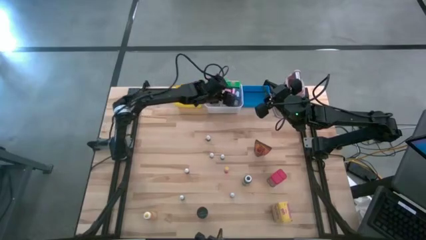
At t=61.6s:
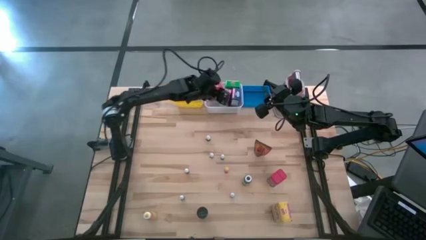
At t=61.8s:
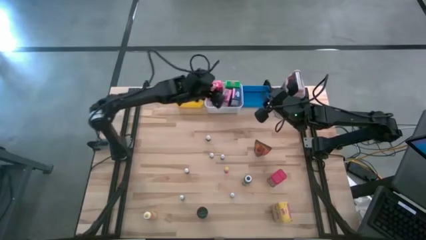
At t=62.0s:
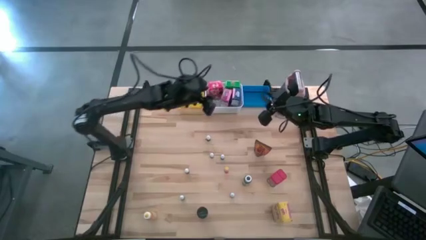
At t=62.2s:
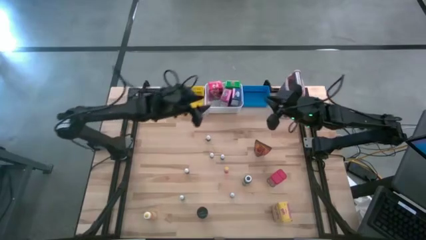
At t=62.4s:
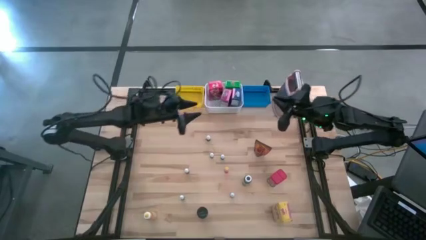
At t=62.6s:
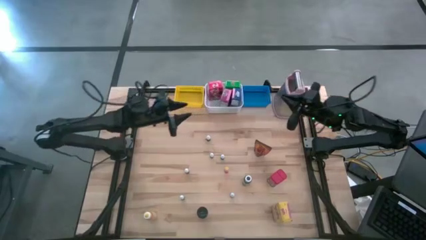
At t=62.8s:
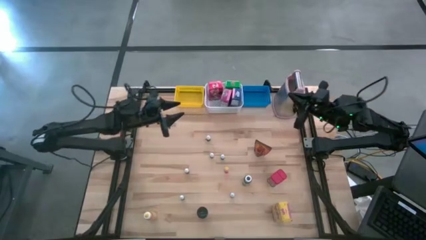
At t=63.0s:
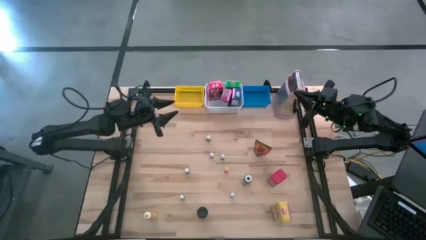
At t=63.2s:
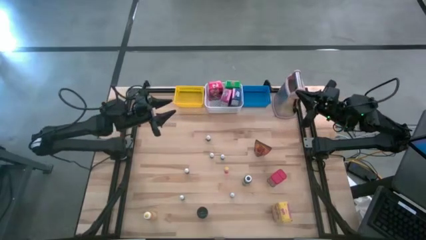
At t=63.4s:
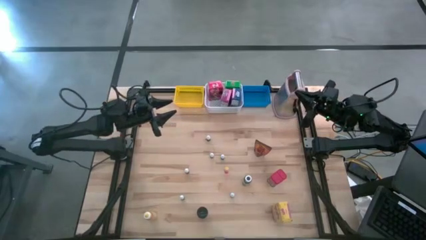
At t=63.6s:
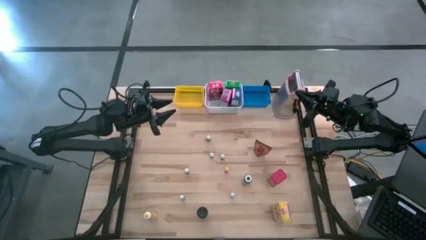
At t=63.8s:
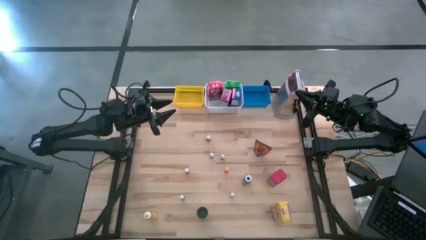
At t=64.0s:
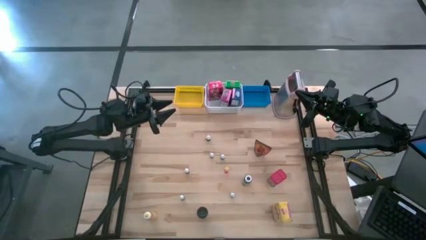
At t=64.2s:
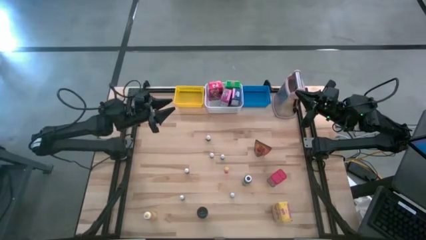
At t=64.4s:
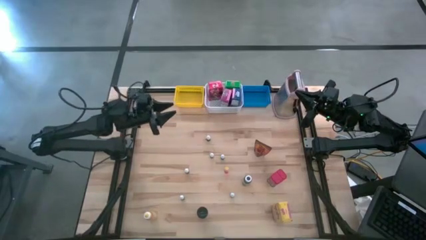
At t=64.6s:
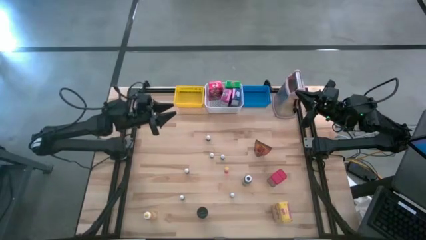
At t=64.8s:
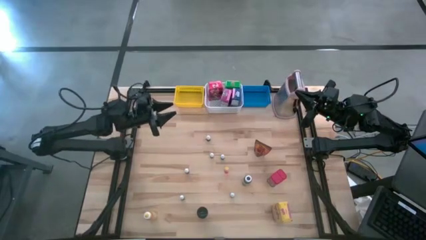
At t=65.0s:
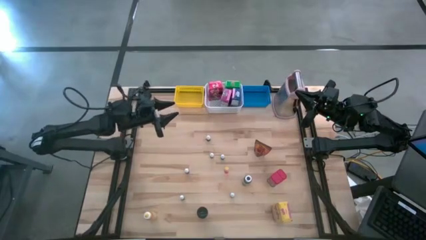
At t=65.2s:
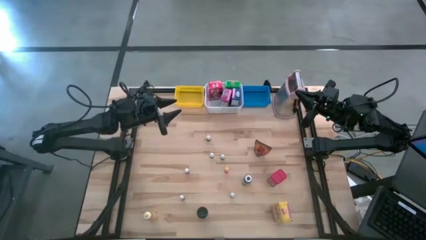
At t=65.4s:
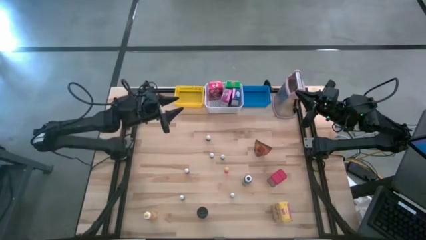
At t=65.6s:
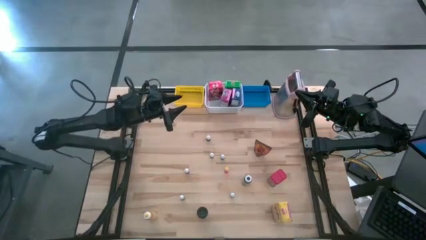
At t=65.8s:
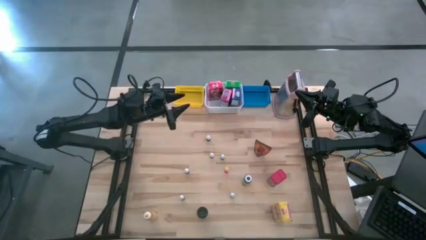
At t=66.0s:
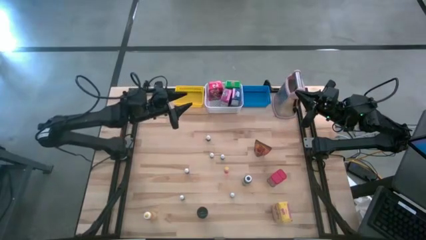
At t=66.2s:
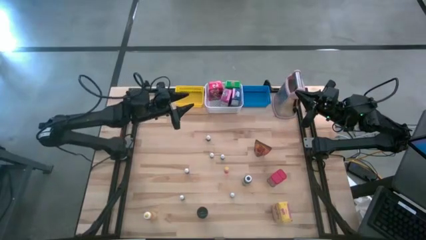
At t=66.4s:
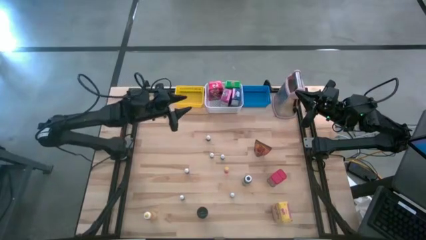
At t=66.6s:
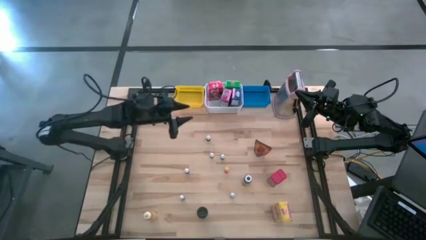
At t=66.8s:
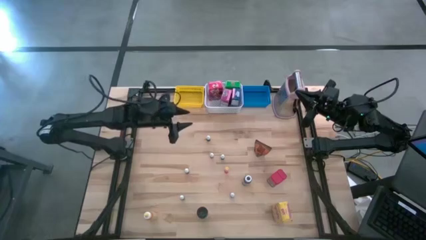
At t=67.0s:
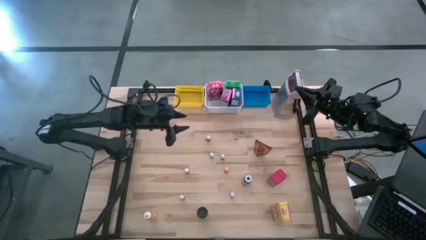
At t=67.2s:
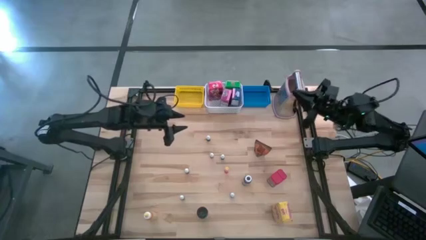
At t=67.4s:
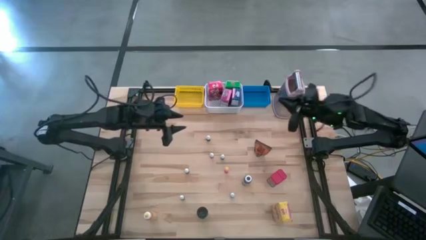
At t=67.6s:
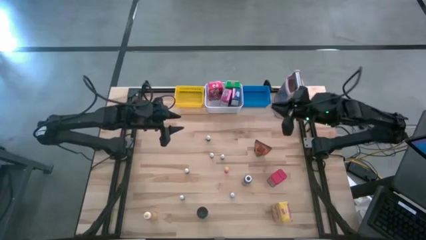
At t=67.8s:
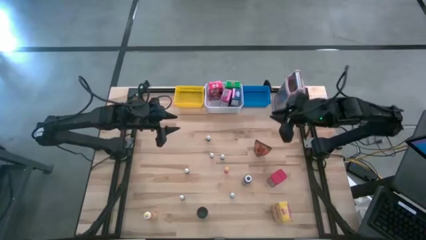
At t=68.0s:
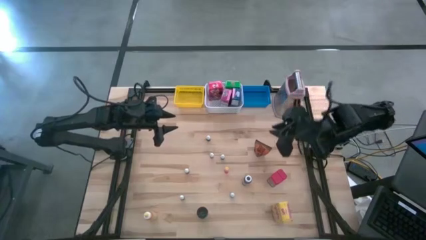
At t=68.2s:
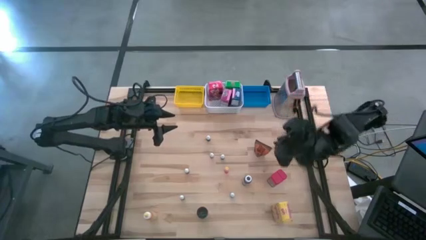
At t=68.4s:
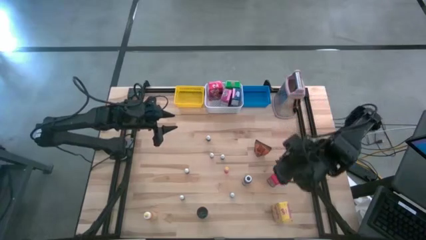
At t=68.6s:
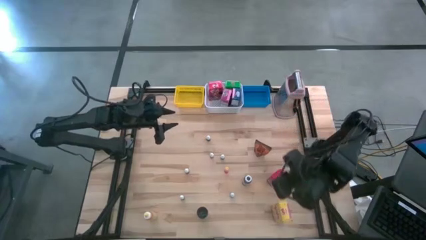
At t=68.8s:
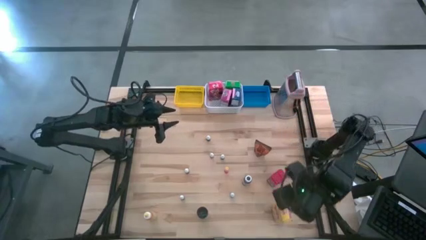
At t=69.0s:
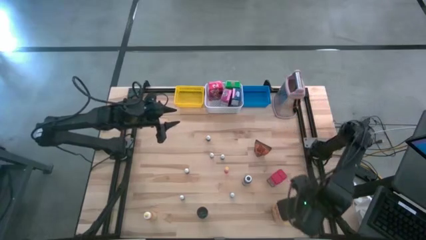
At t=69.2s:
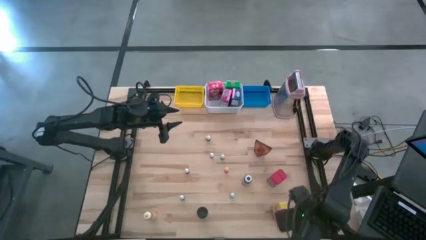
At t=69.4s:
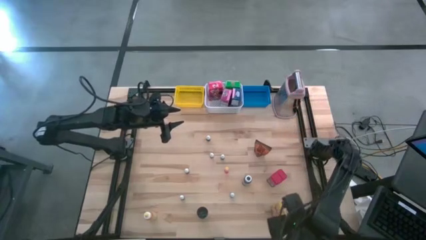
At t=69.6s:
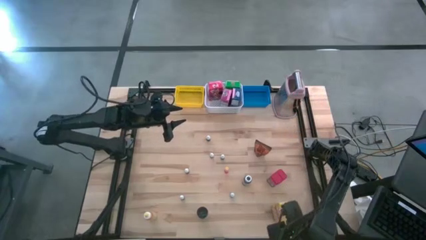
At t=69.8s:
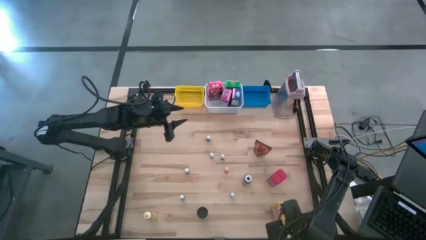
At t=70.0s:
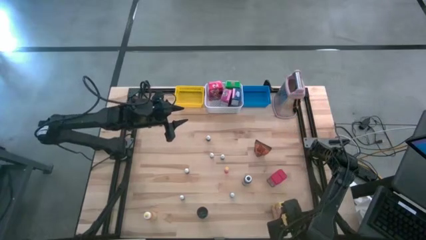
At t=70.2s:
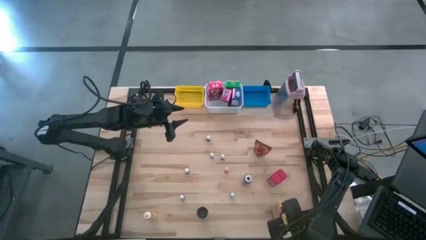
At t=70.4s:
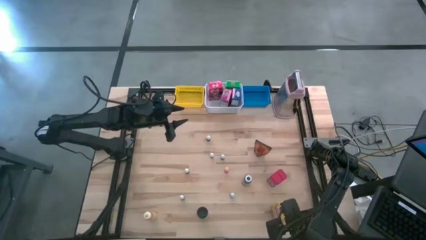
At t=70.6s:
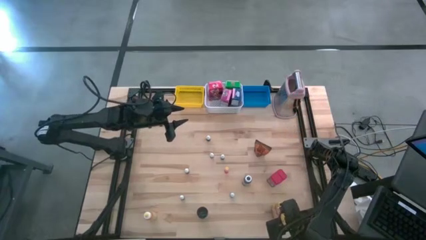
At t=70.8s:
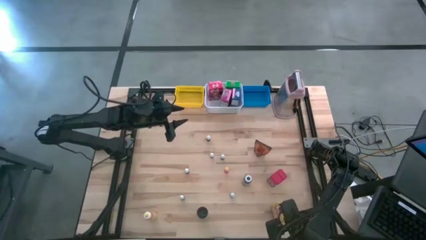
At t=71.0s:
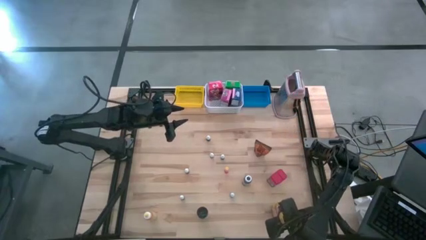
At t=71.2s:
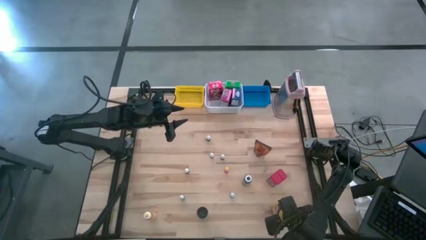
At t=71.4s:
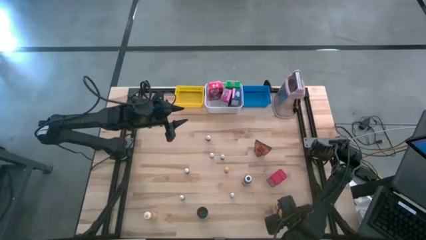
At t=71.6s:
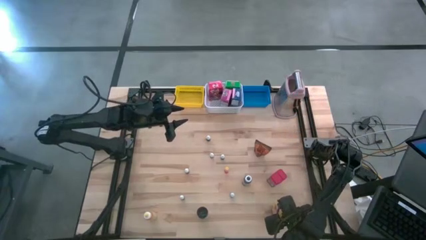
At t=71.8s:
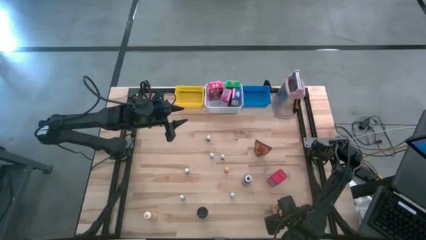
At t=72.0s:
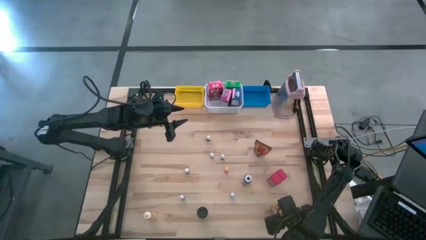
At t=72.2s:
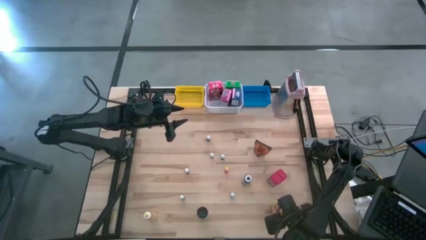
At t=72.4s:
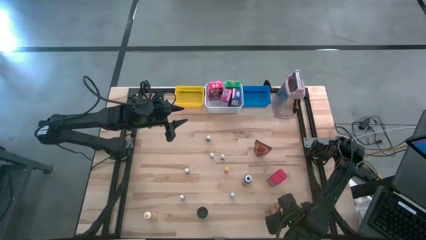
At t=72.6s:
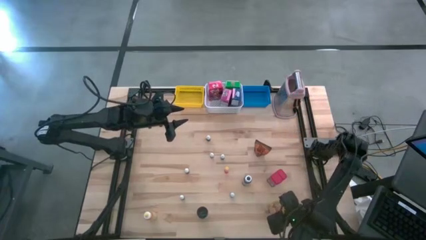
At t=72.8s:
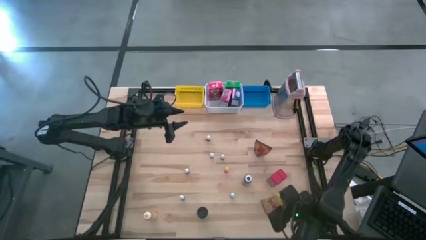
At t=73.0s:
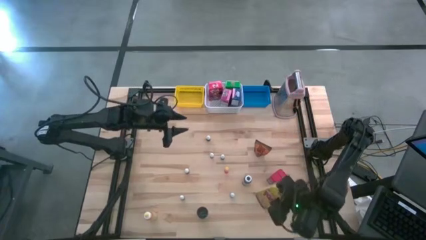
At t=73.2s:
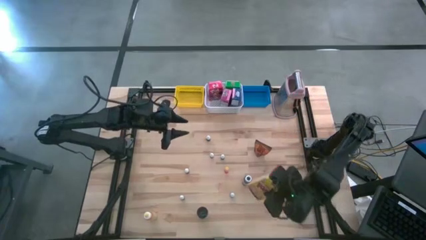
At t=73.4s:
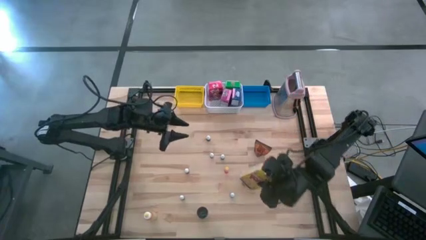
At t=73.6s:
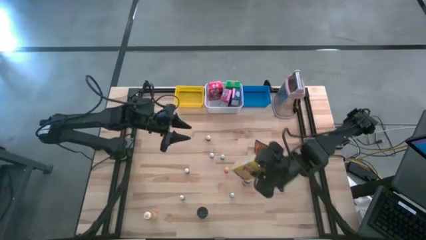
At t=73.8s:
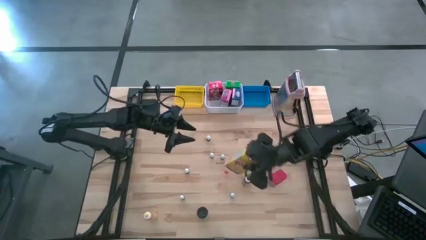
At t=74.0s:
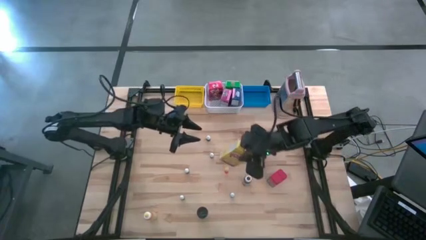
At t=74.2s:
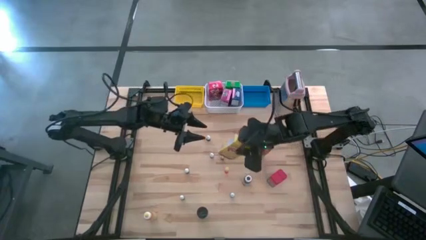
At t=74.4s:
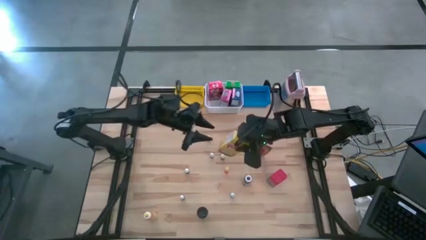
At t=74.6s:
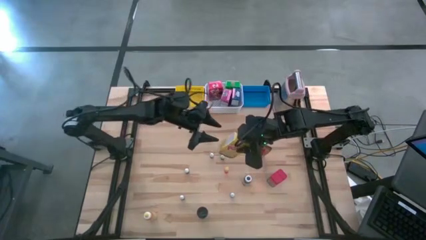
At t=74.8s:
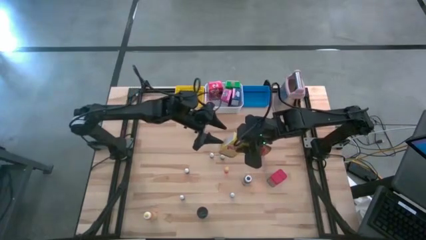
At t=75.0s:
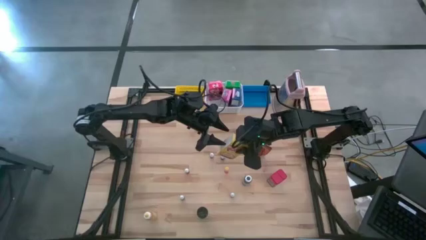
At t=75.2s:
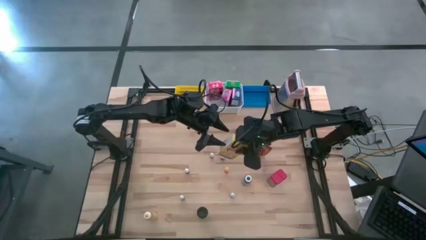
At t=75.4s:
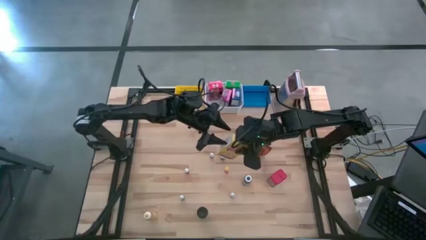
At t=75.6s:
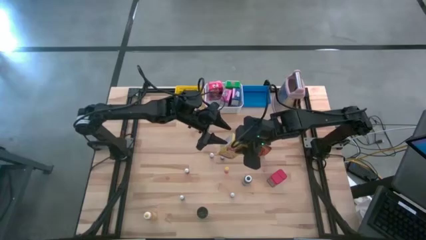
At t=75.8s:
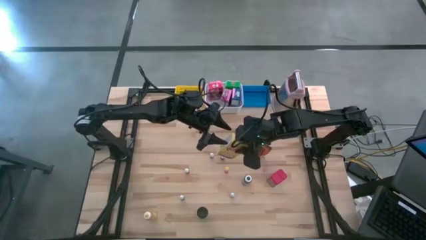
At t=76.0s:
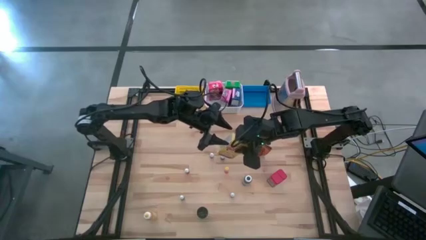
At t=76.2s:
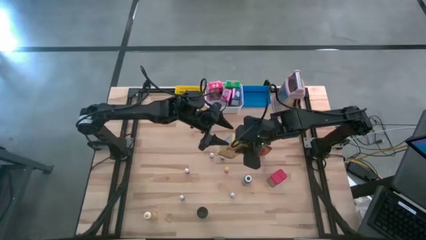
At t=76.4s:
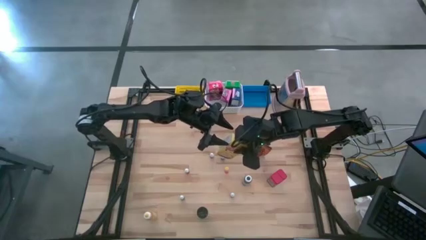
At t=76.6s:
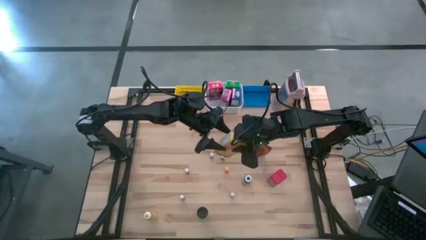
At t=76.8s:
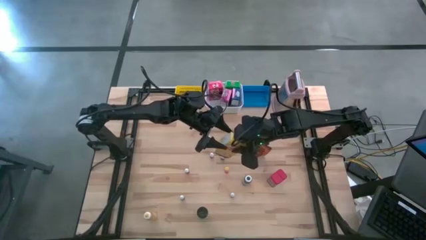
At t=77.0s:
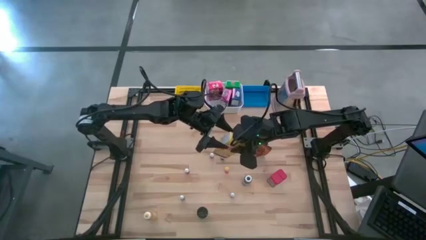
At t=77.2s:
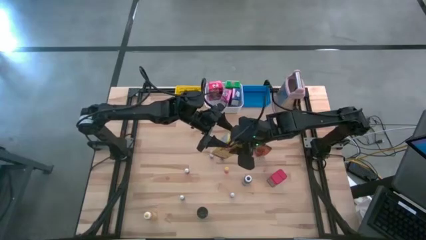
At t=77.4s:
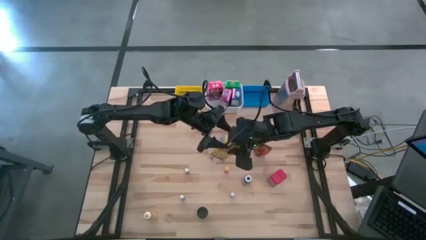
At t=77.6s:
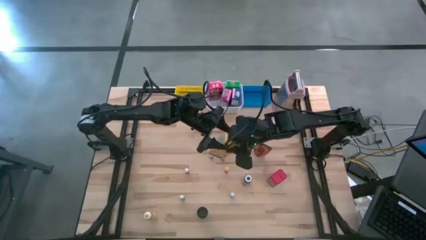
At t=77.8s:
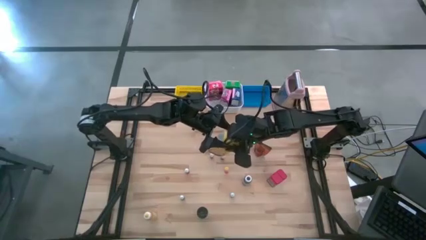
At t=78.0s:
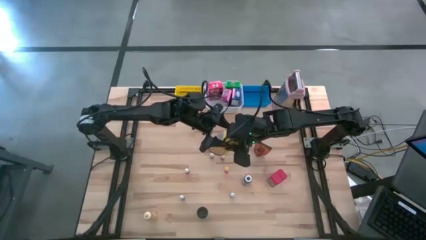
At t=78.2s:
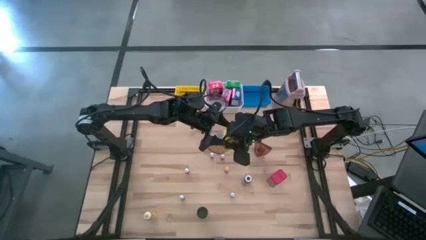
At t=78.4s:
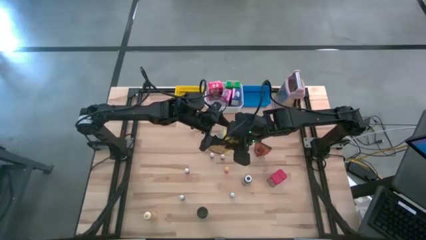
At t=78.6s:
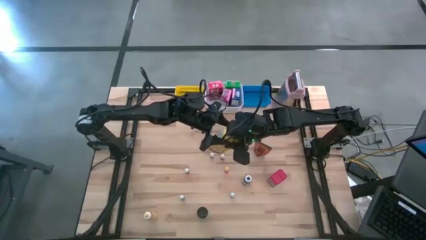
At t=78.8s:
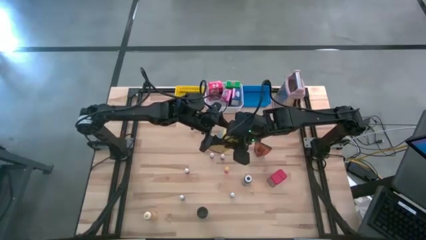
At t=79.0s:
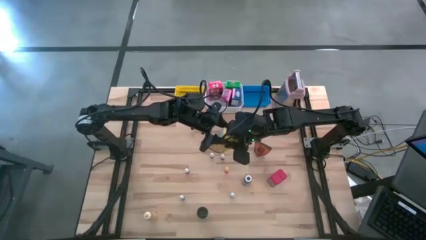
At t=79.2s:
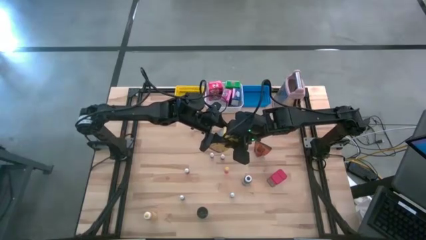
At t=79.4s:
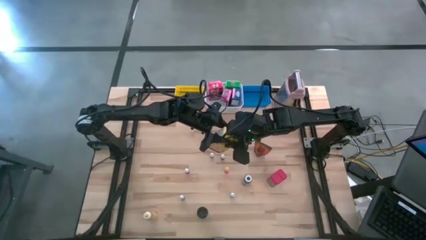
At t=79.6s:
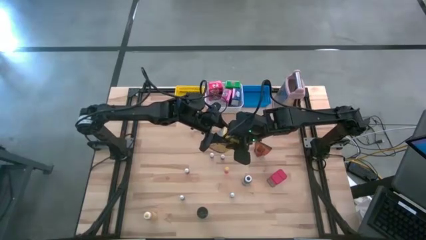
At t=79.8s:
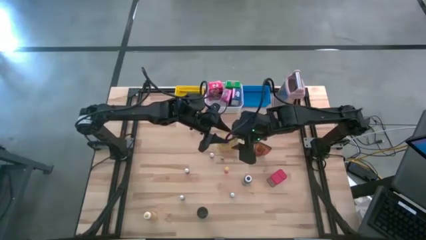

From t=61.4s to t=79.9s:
Task: Pick & Place Kitchen Items
Put the yellow cereal box into the white basket
